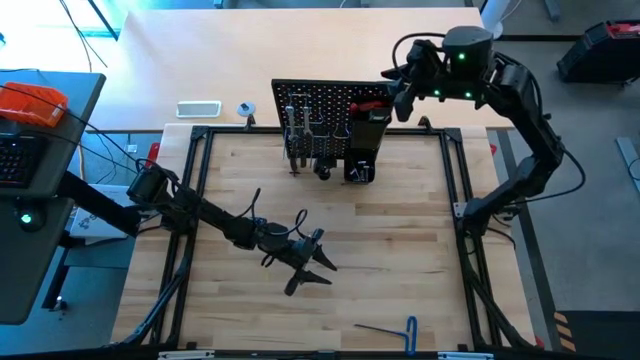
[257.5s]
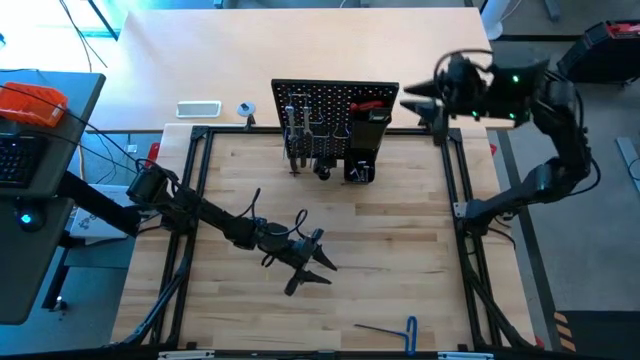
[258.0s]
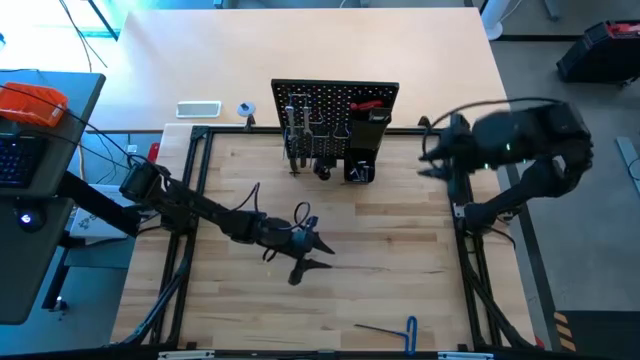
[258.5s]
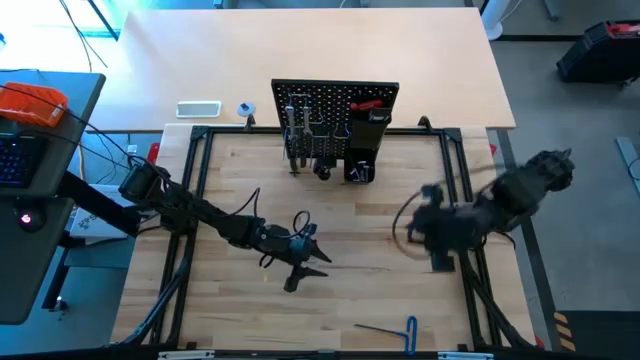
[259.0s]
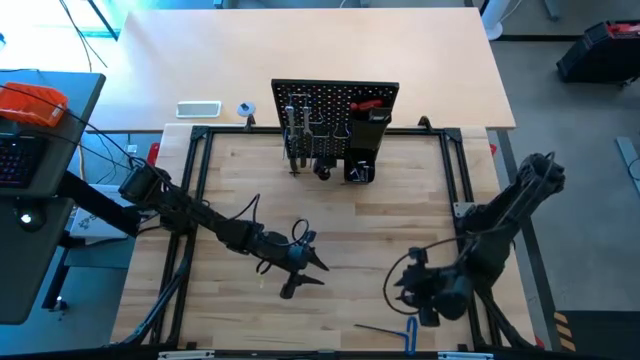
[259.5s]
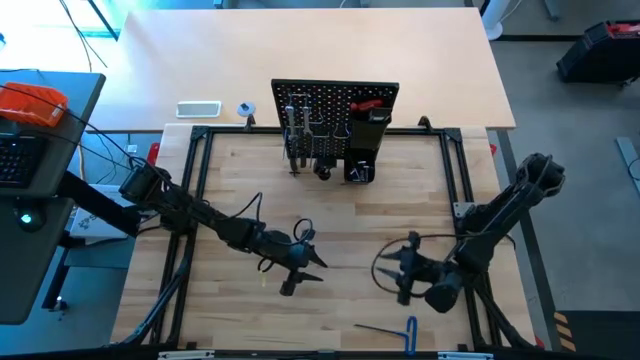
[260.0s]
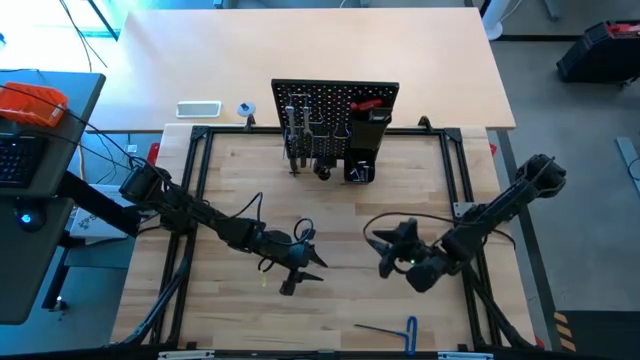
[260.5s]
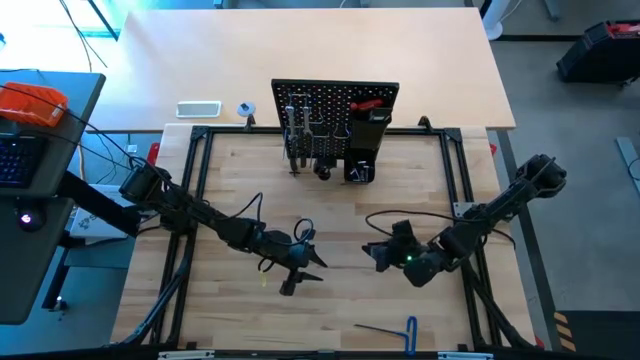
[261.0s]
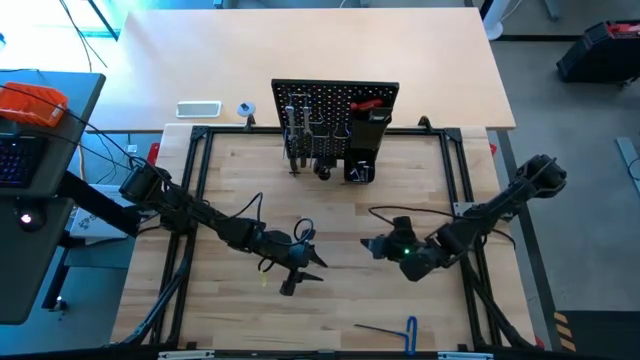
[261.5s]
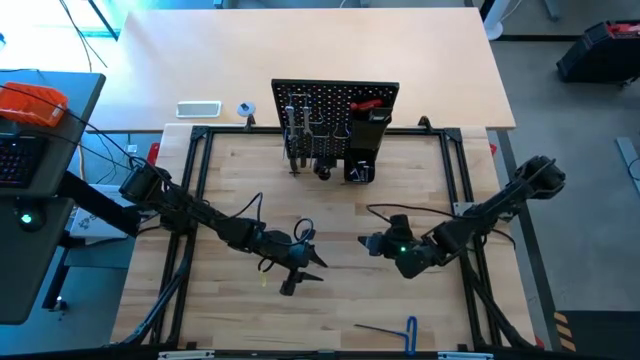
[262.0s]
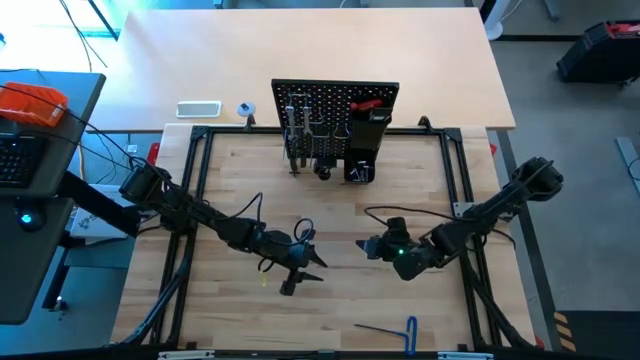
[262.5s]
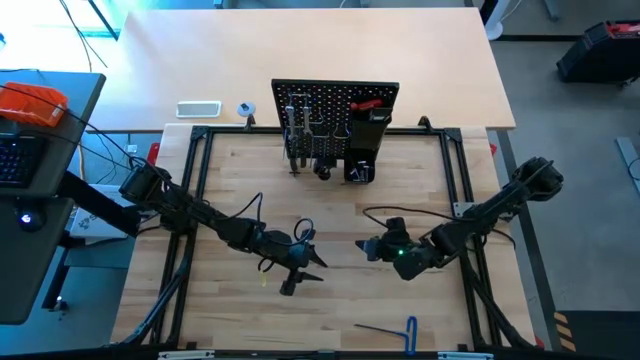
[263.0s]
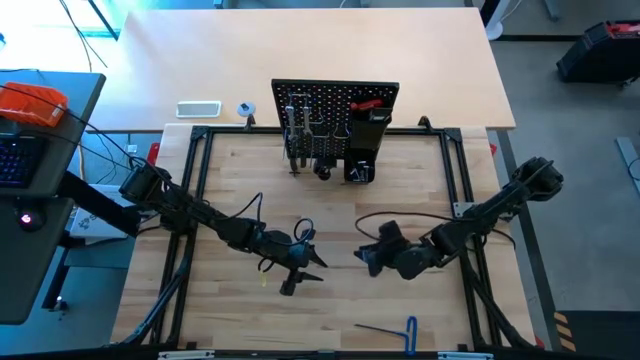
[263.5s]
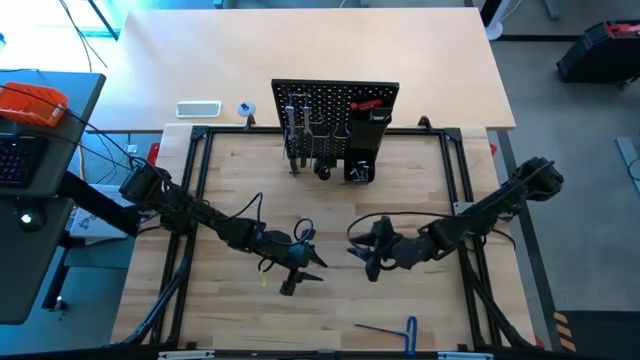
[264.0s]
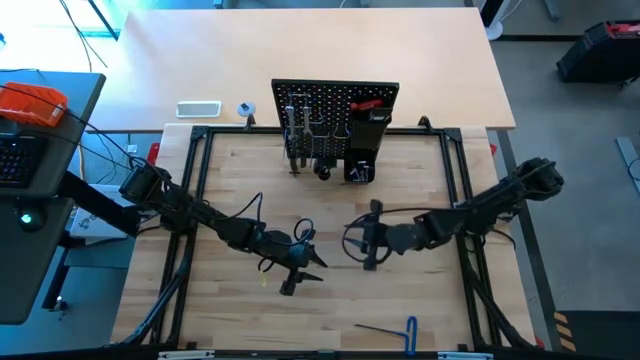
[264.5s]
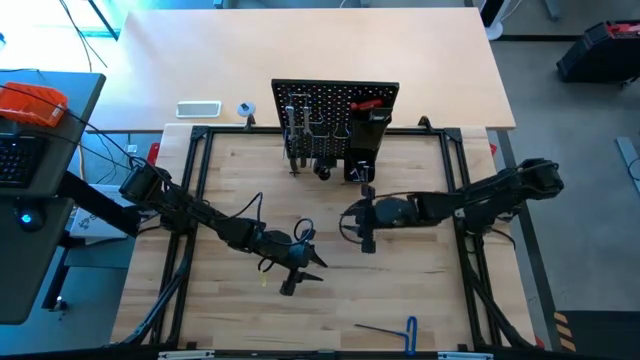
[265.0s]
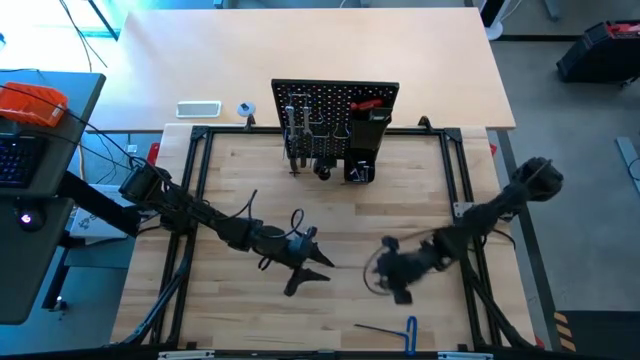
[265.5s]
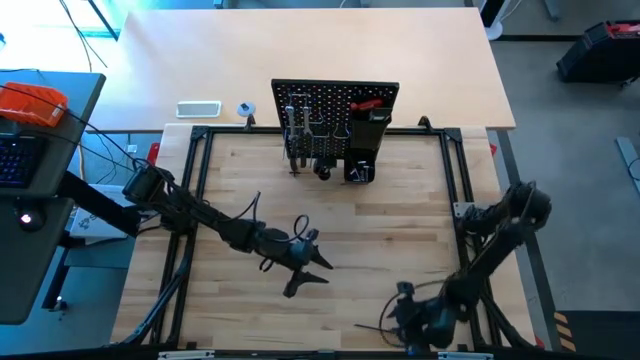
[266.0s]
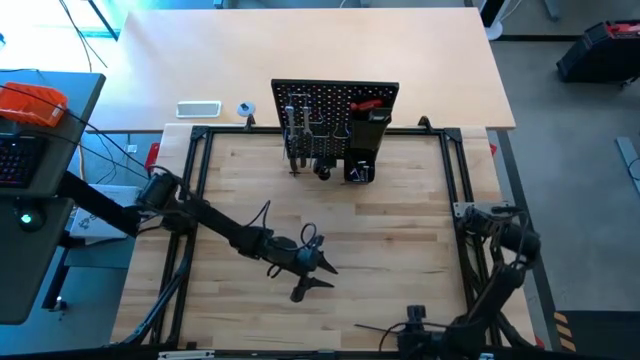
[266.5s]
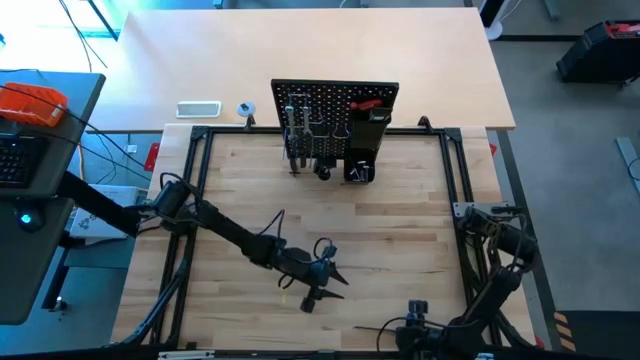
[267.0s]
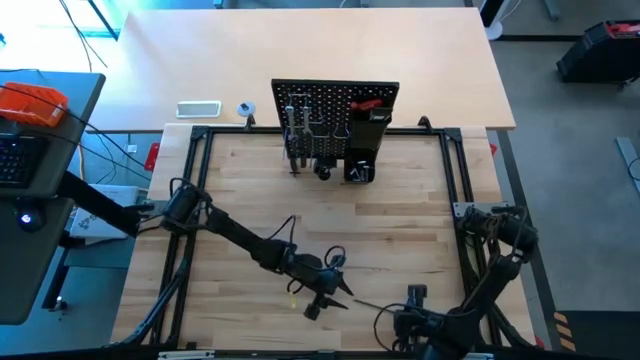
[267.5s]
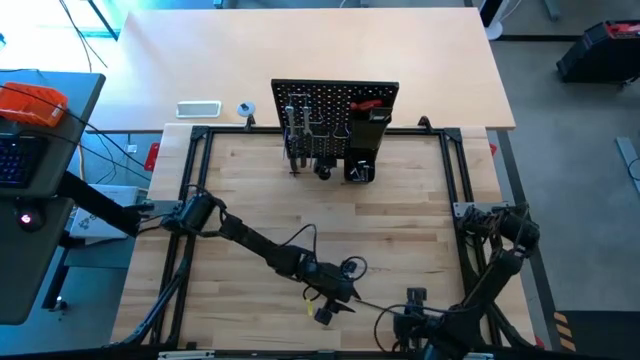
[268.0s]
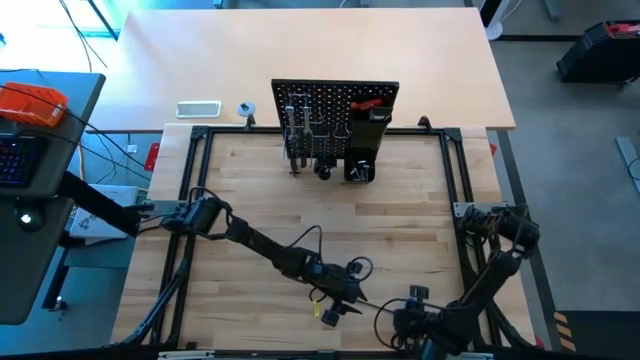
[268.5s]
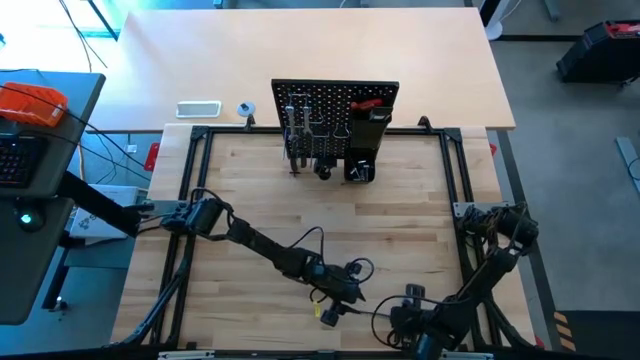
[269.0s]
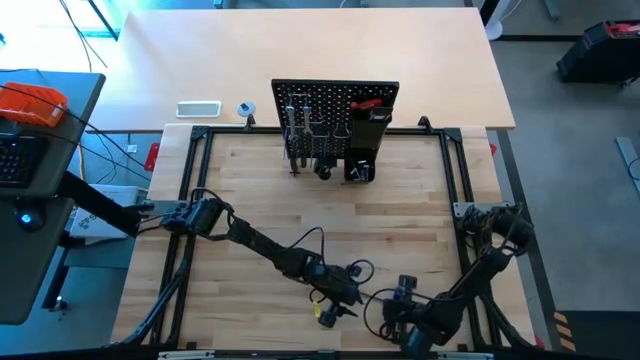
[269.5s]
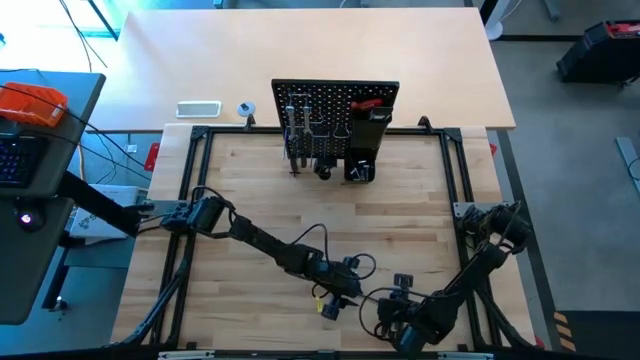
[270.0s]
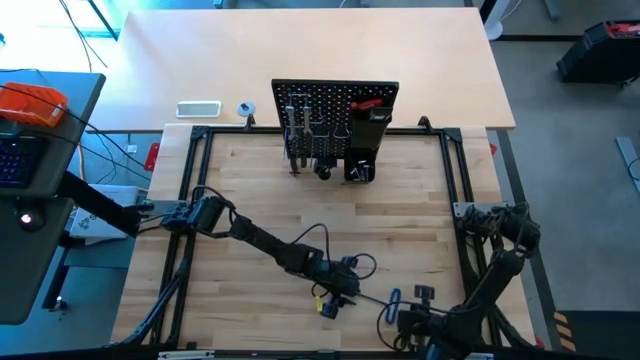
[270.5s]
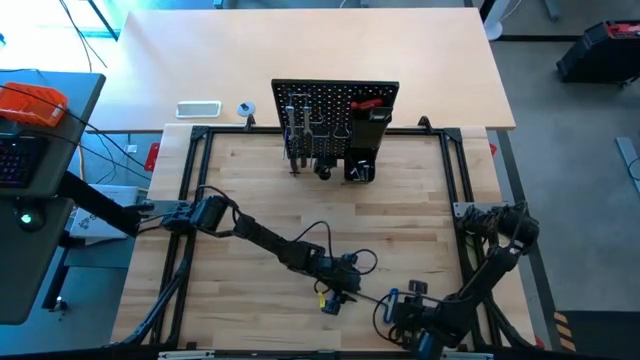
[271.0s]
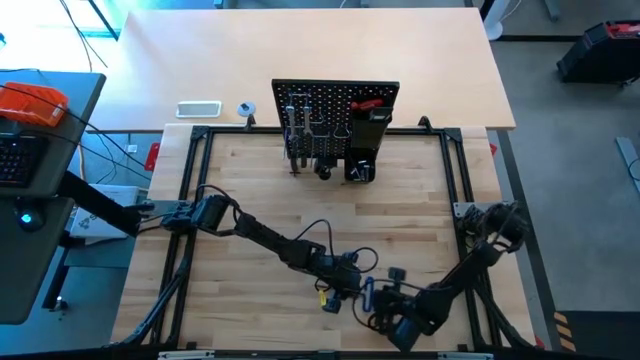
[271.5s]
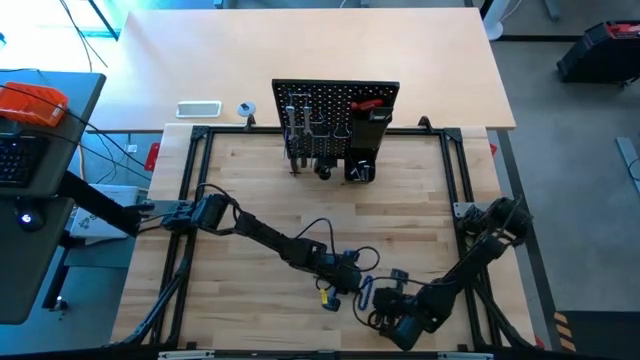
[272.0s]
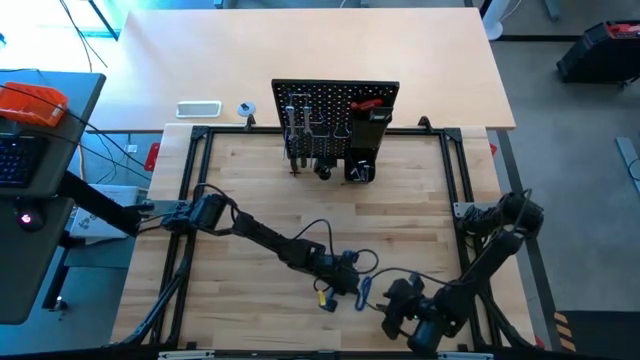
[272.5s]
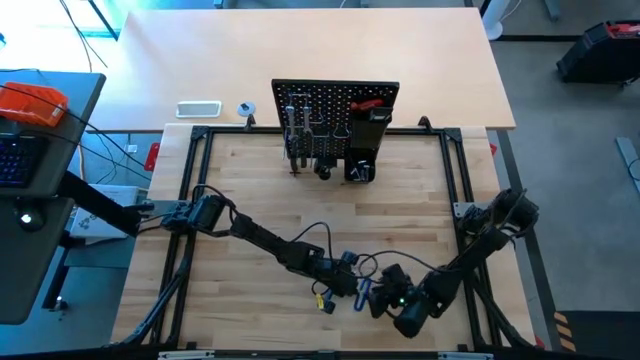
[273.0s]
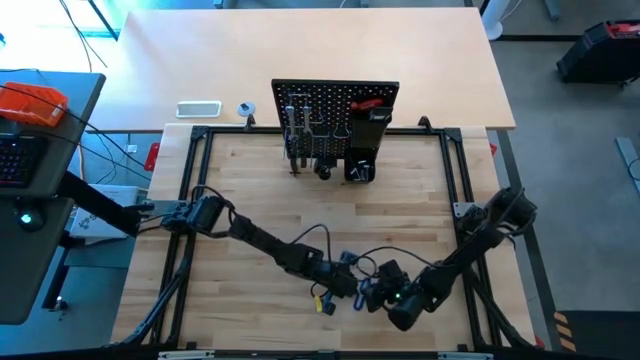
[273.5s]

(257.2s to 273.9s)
Task: Hang tools onto peg board
Hang the blue pick tool onto the peg board

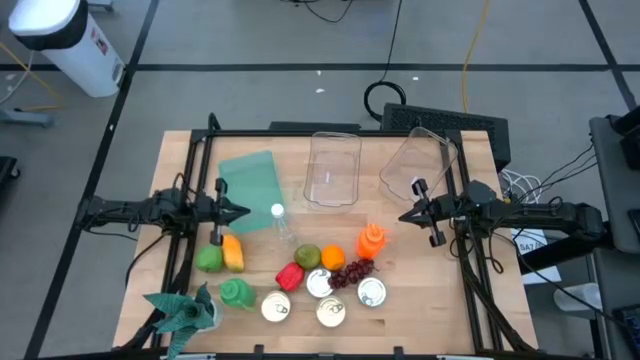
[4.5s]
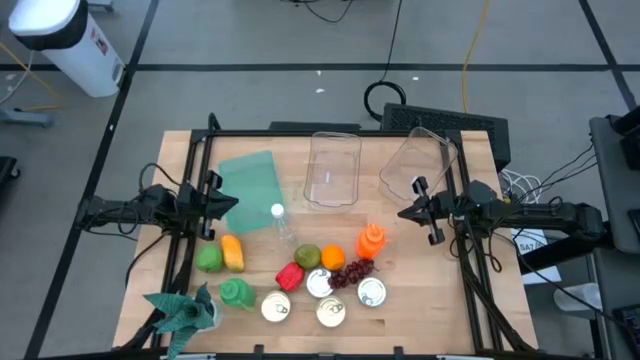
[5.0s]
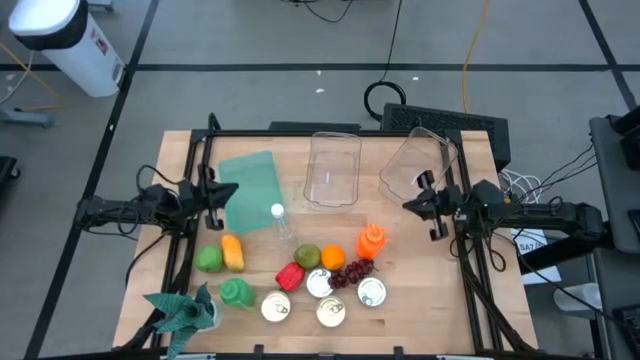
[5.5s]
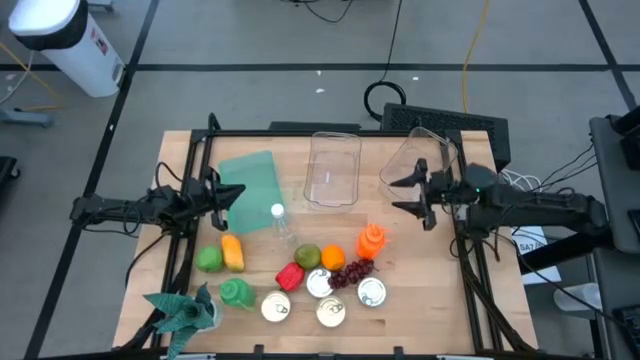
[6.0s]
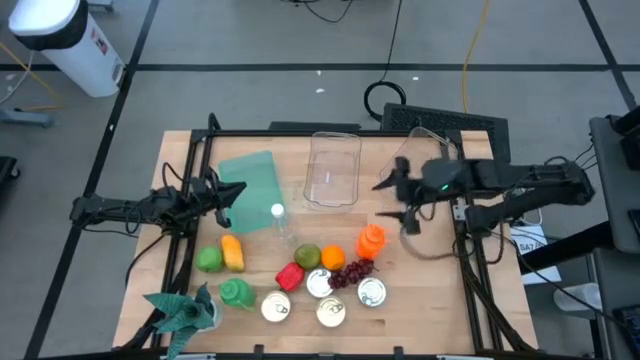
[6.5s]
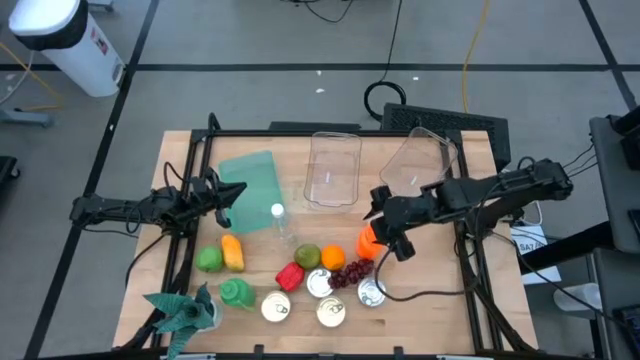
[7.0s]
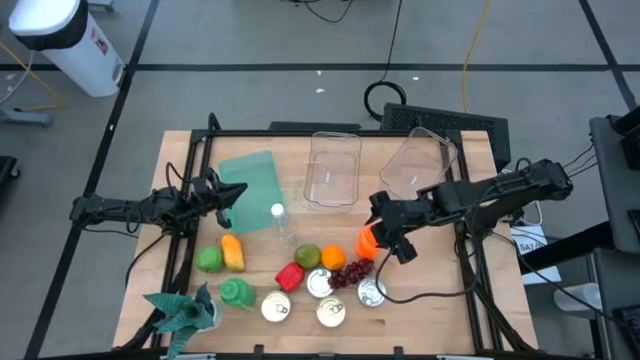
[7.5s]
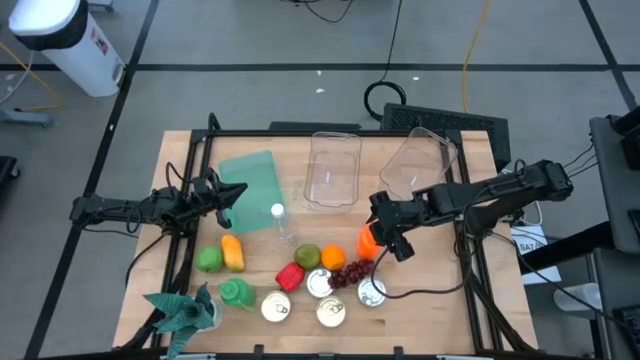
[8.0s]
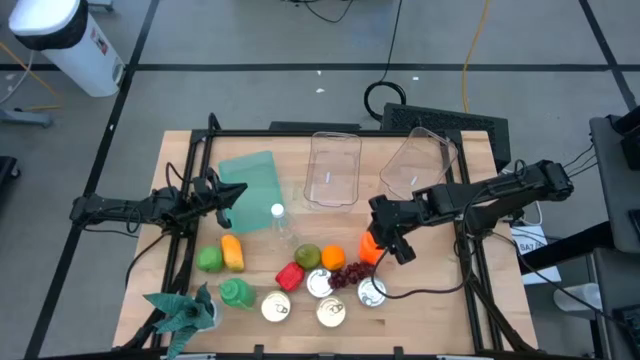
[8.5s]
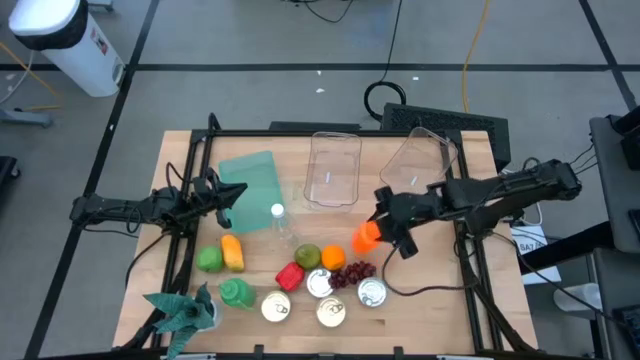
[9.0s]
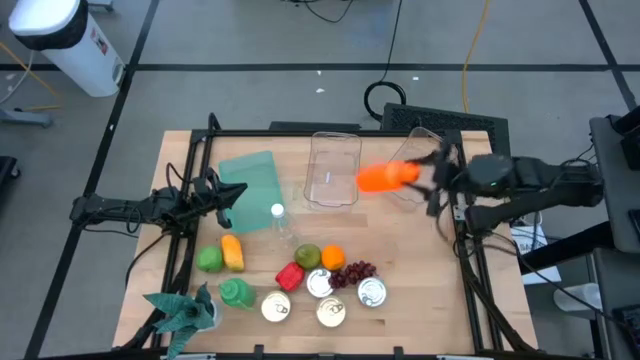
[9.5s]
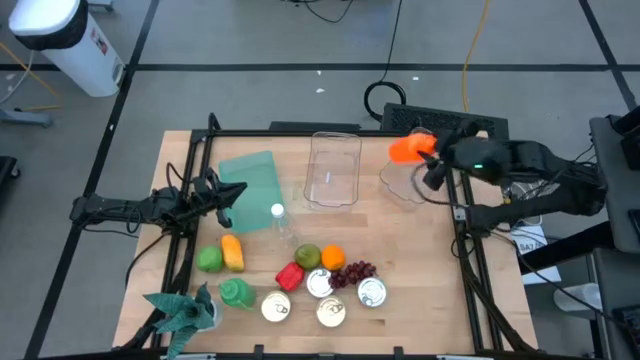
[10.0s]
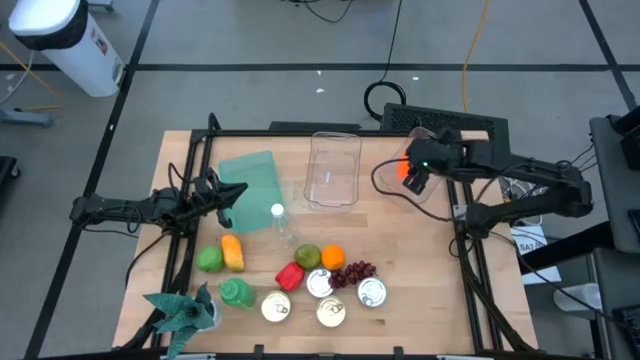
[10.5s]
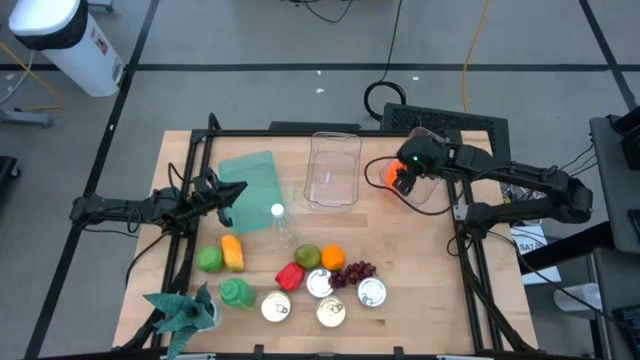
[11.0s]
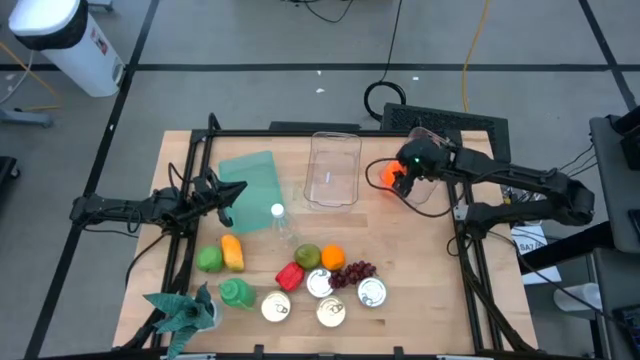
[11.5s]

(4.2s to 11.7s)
Task: Pick & Place Food Item
Put the orange water bottle into the right transparent bin
